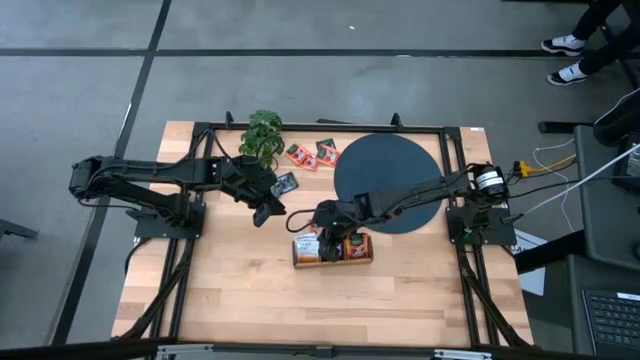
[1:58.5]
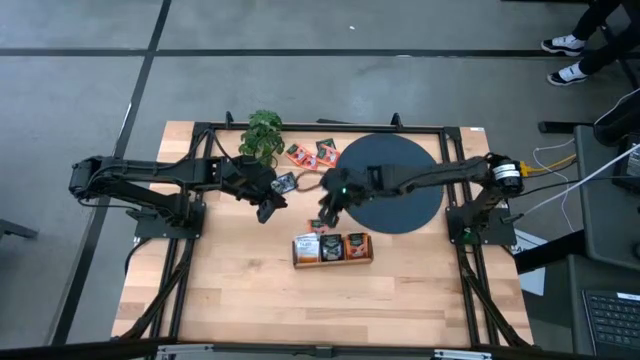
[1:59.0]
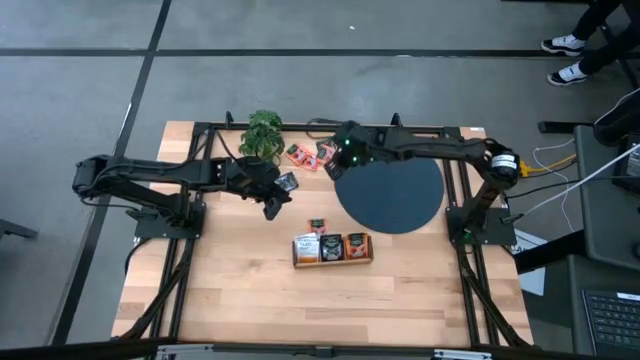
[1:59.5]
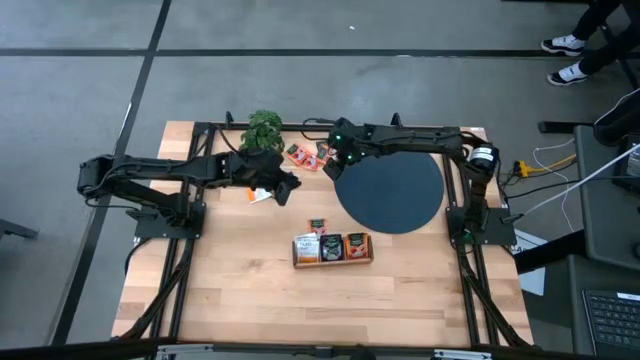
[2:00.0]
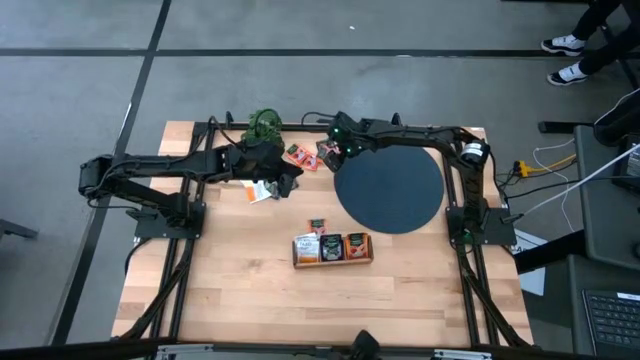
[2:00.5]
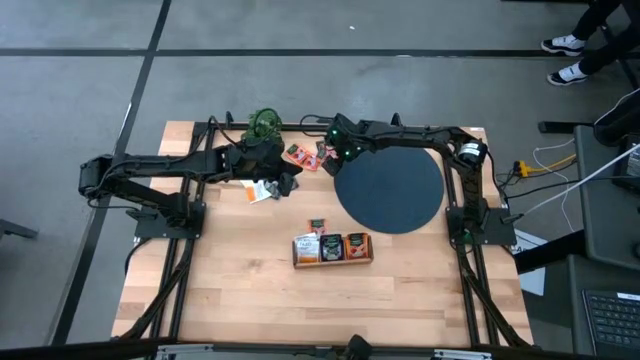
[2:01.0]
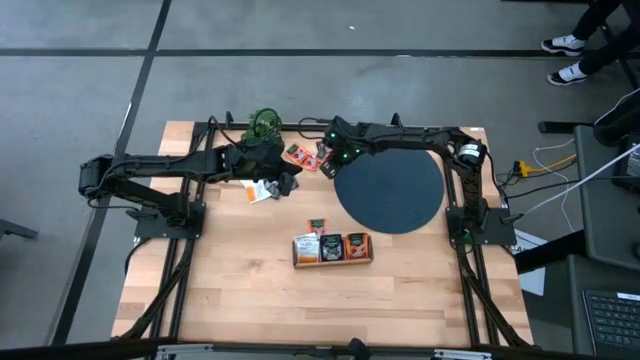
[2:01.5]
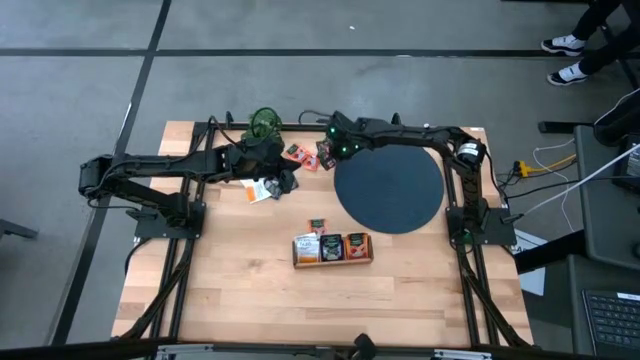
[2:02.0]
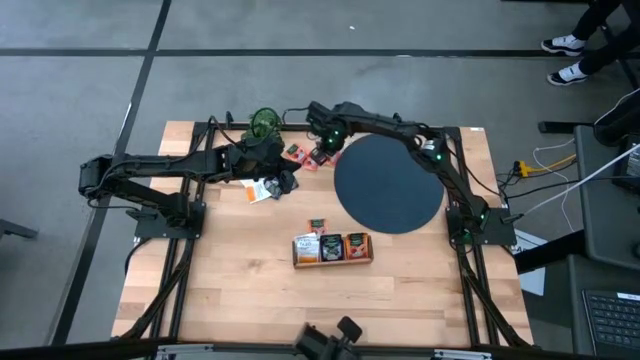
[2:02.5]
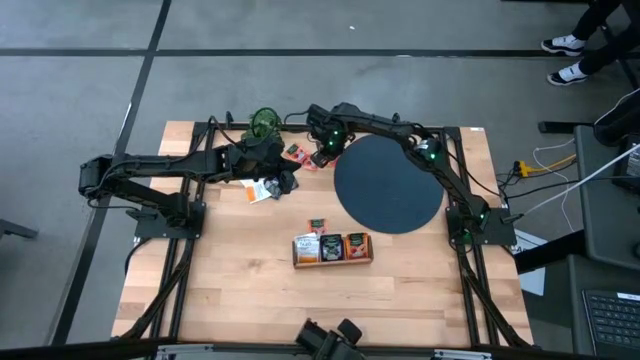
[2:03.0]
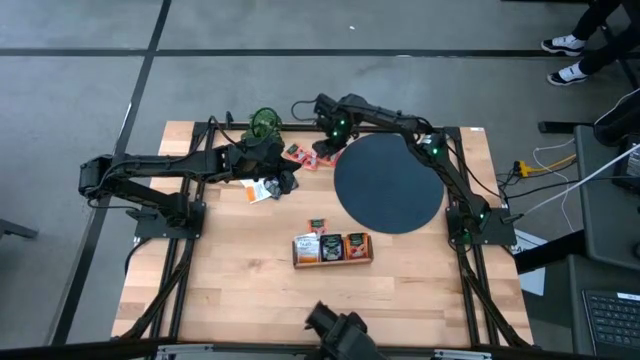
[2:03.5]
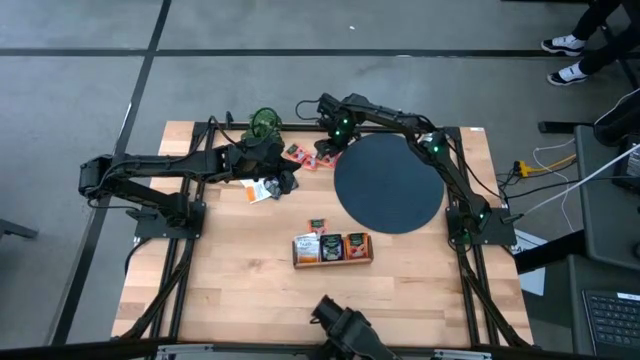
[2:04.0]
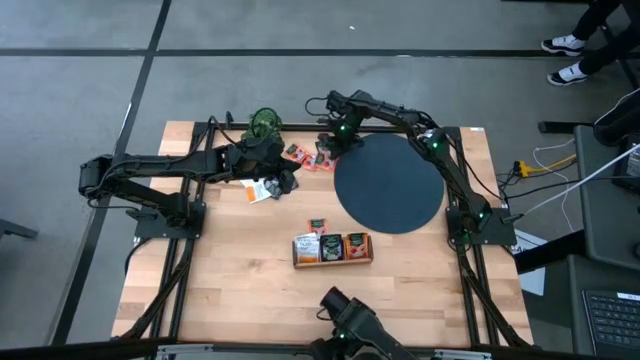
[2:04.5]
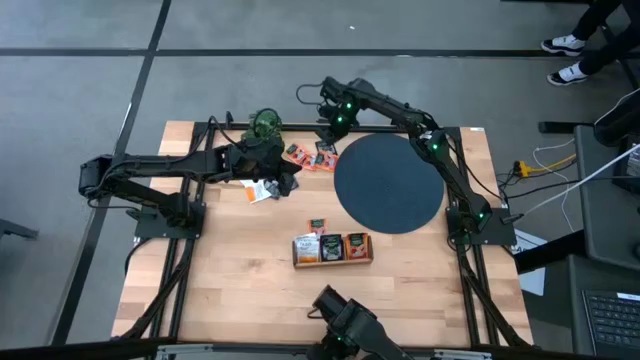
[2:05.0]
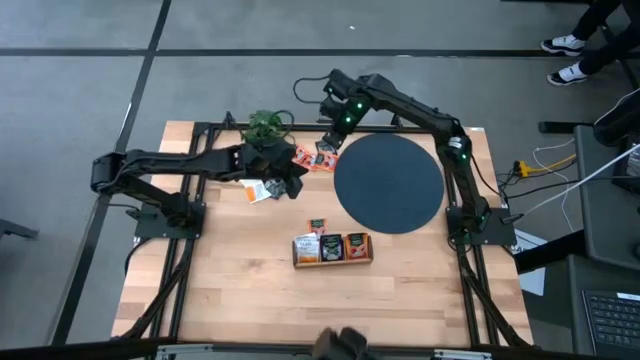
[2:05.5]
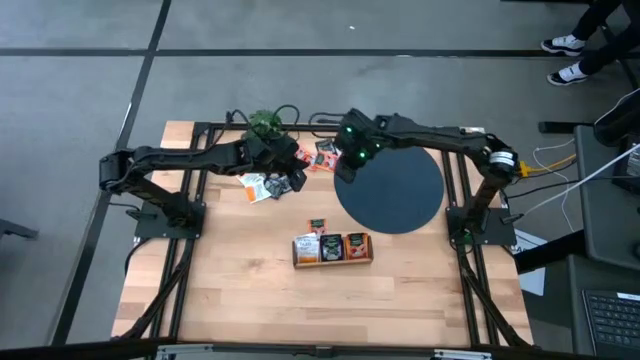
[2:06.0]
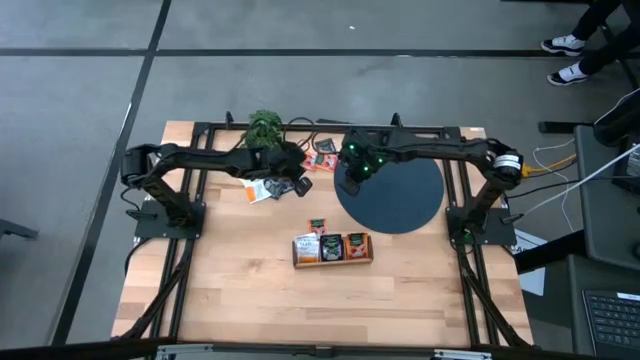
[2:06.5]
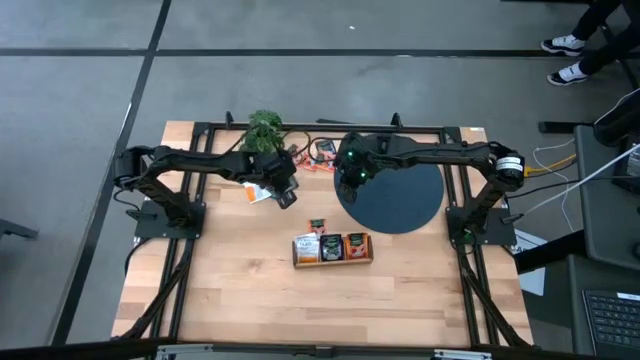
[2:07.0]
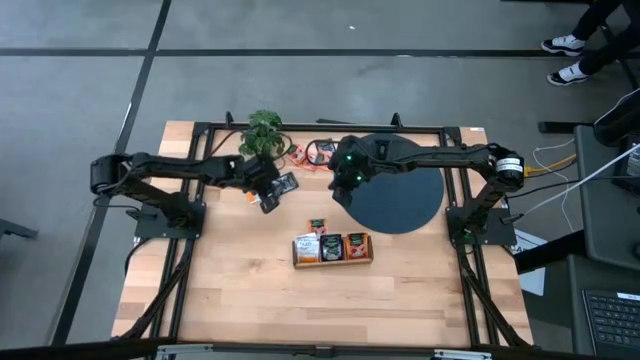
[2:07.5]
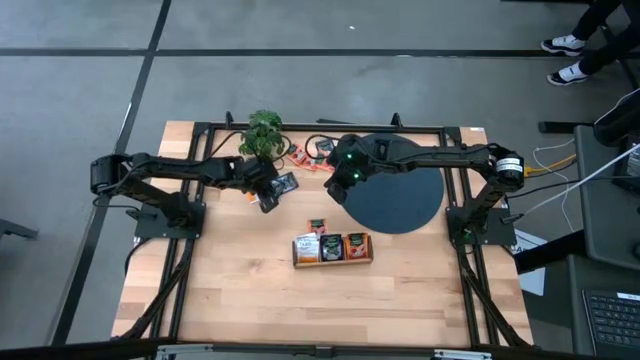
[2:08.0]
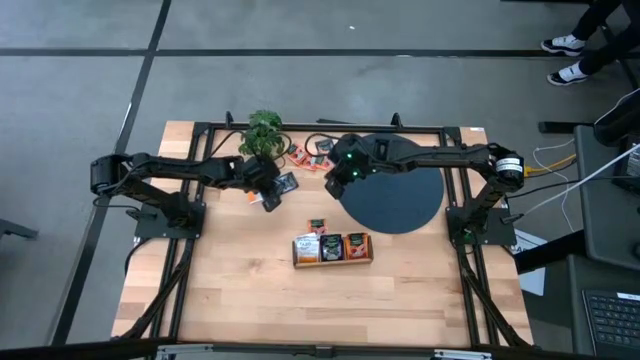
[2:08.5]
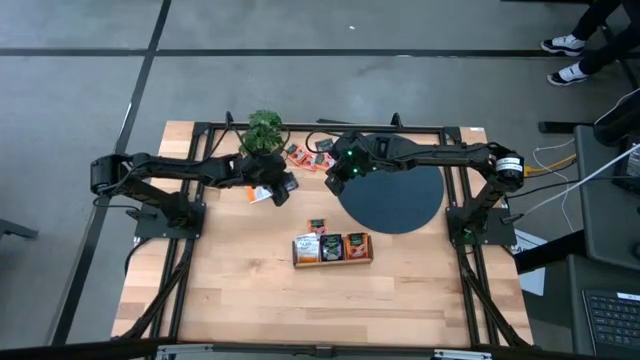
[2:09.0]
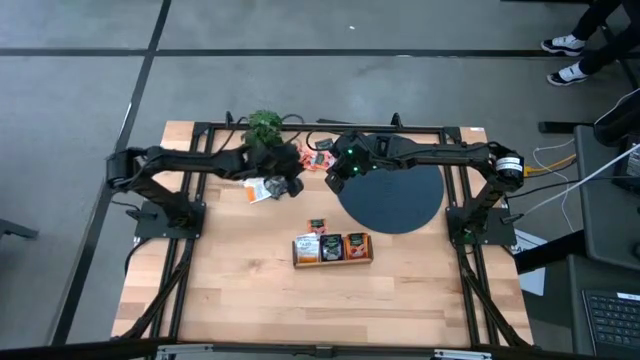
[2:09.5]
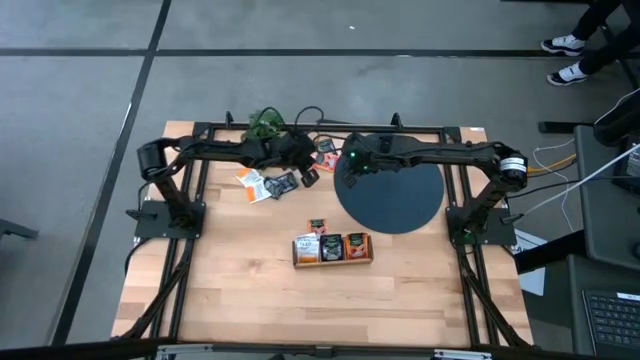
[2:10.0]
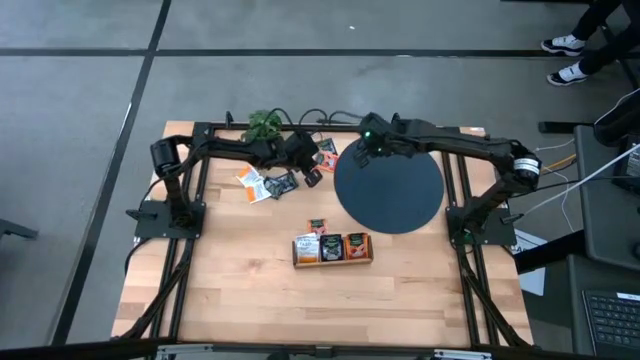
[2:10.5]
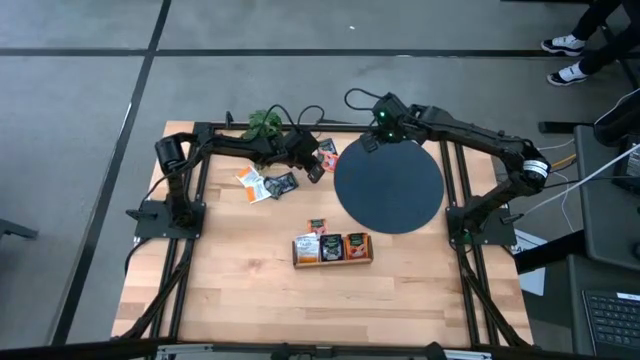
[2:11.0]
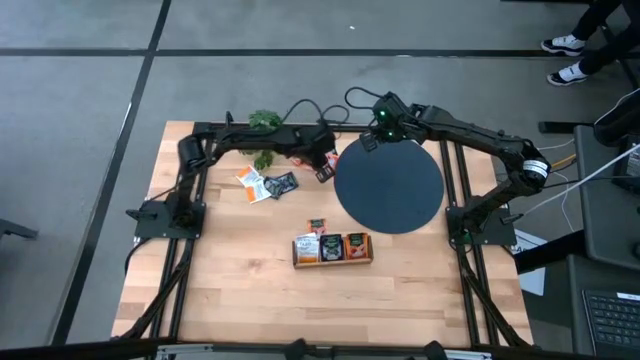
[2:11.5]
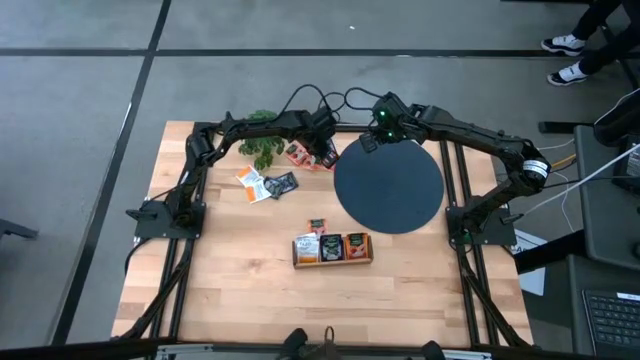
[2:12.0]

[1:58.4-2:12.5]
Task: Pick & Place Tea
Put the orange tea bag into the right section of the wooden organizer

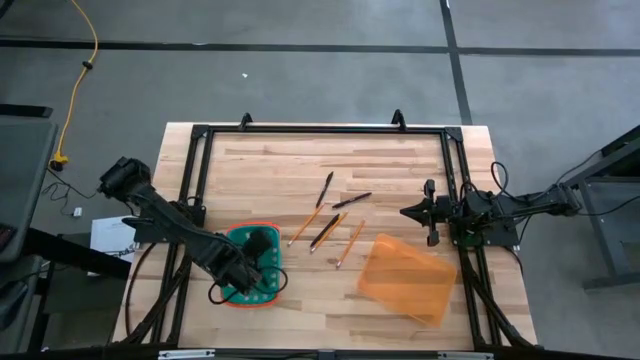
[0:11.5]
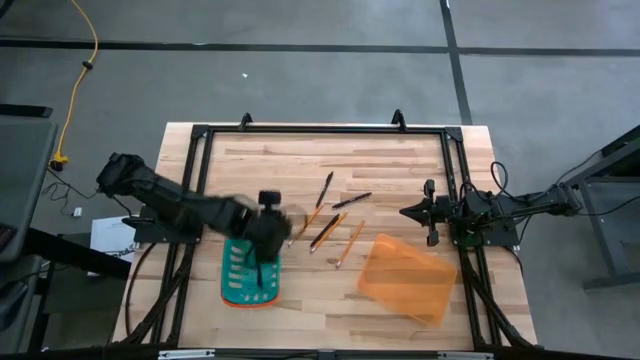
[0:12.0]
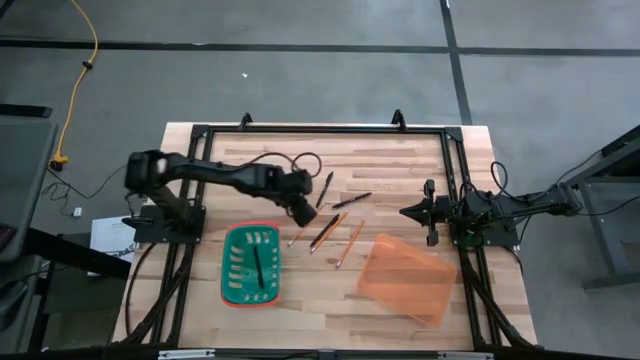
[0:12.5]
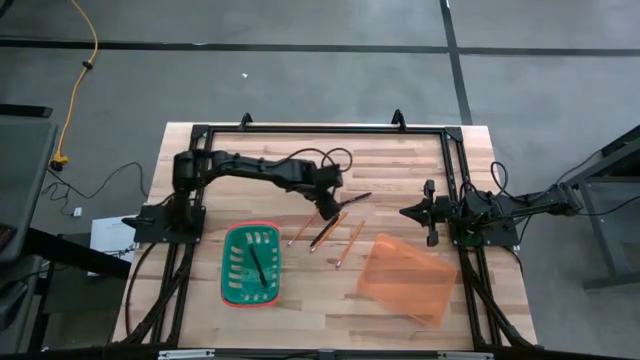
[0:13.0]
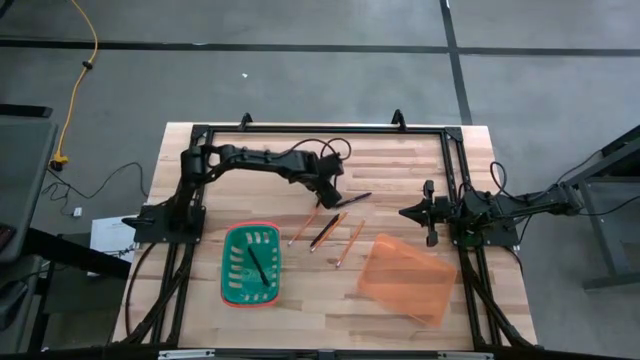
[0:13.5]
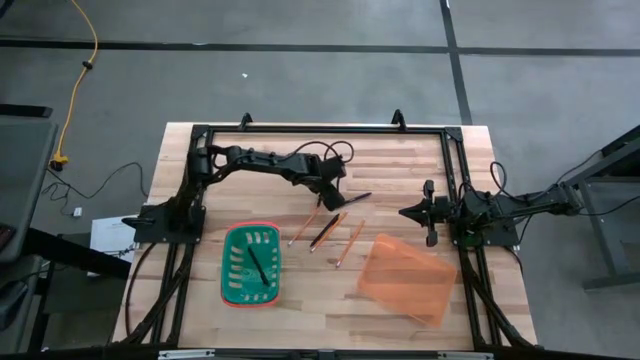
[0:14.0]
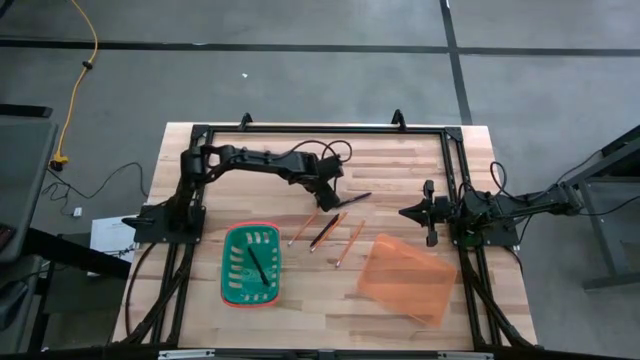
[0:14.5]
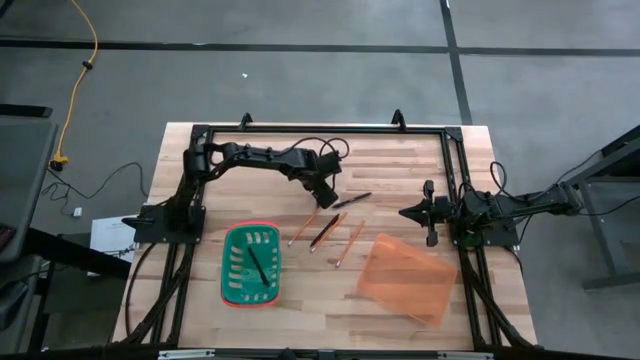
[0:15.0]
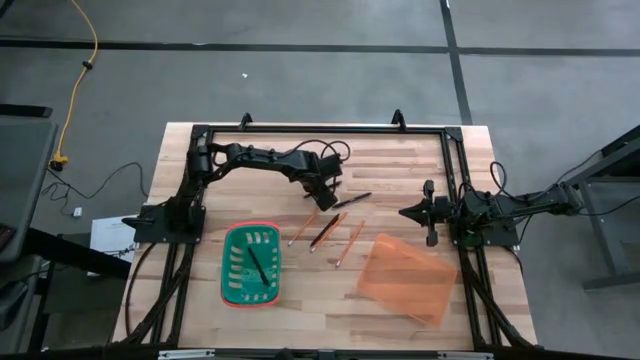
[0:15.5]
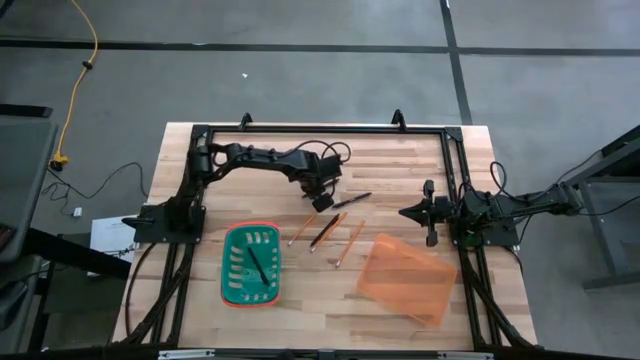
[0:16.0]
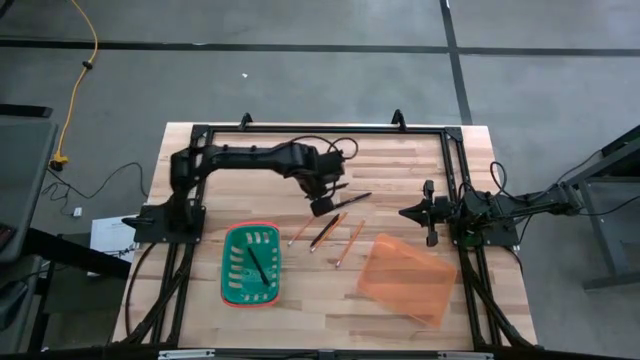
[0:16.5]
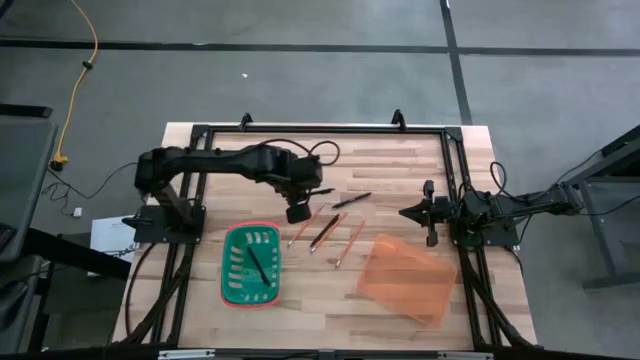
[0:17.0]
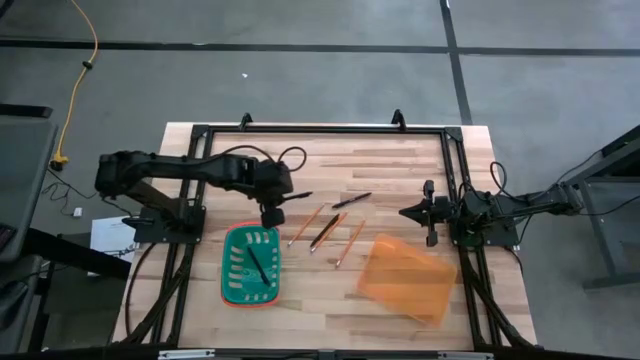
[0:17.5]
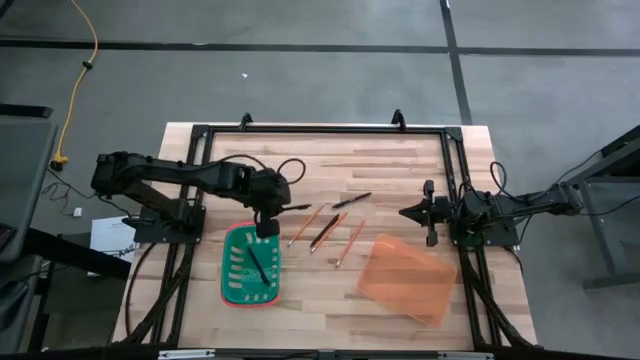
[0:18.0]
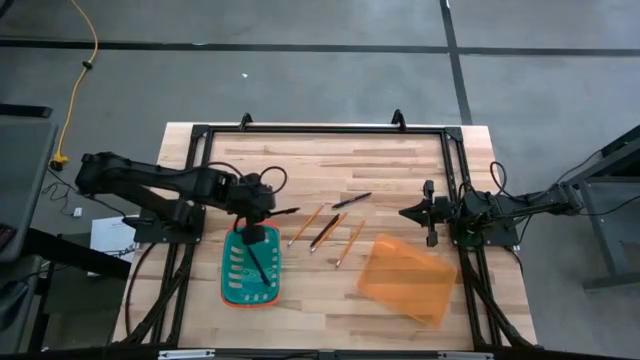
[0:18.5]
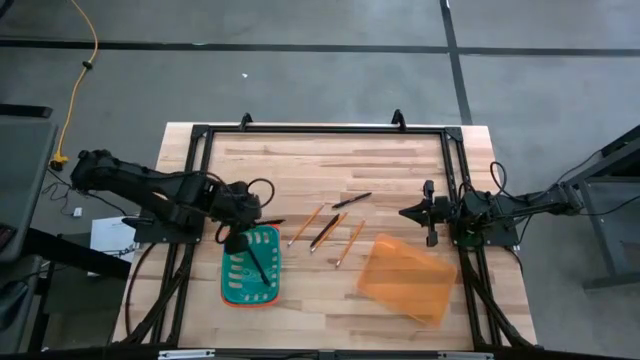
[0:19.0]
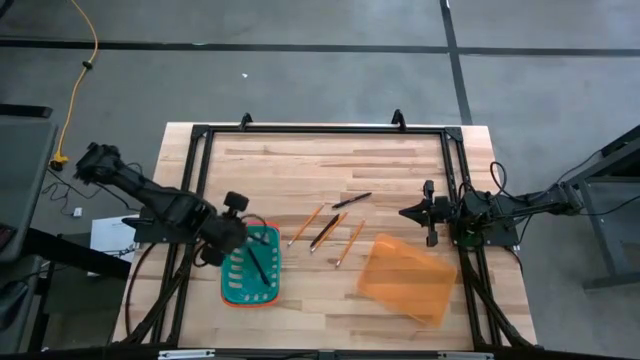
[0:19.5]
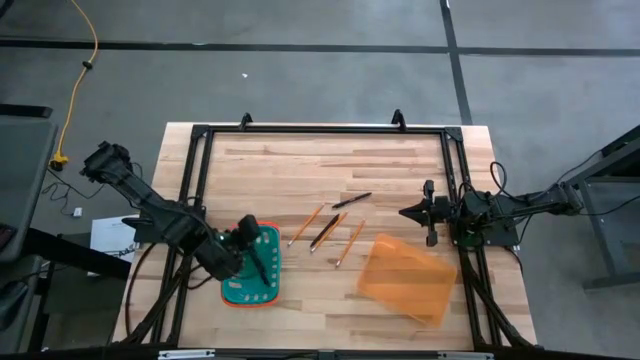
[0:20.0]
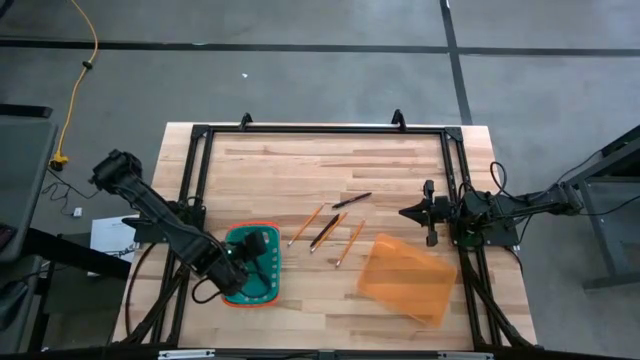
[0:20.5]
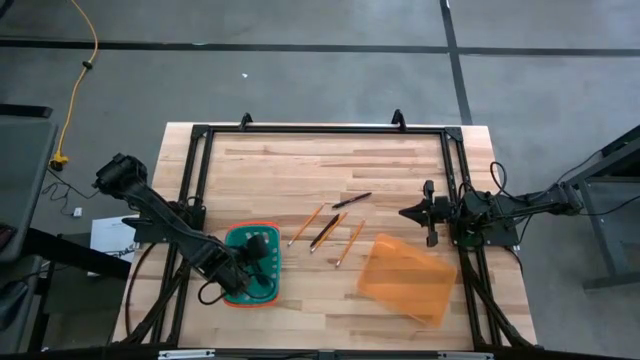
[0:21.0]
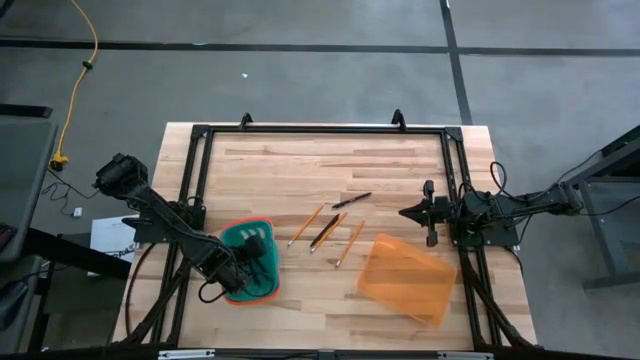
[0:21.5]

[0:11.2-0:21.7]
Task: Sort pens & pencils
Put the black pen into the blue bin
